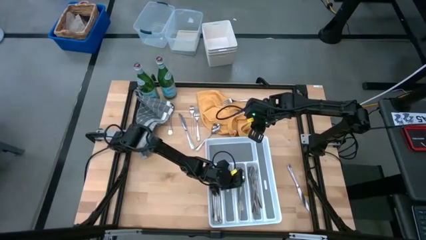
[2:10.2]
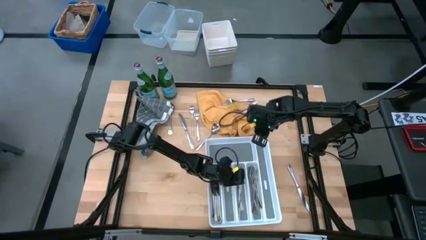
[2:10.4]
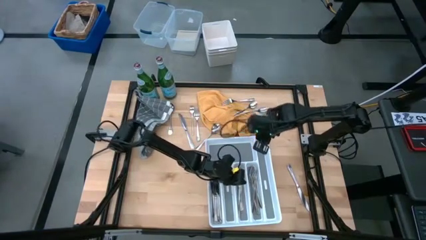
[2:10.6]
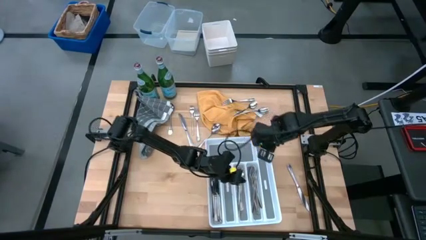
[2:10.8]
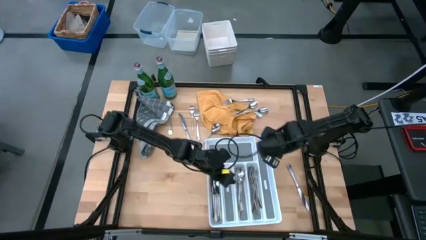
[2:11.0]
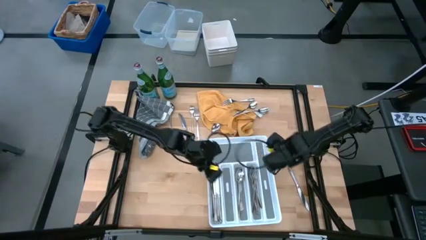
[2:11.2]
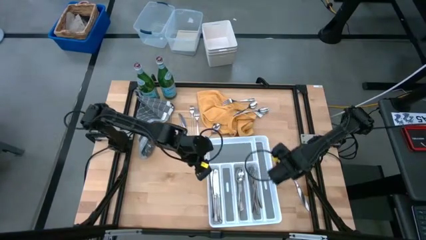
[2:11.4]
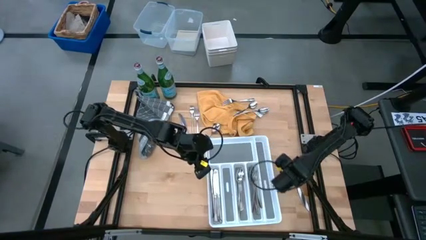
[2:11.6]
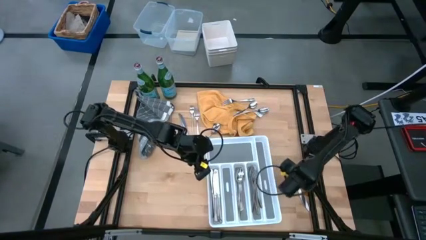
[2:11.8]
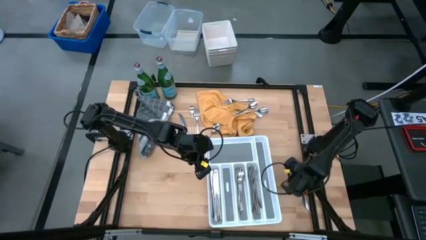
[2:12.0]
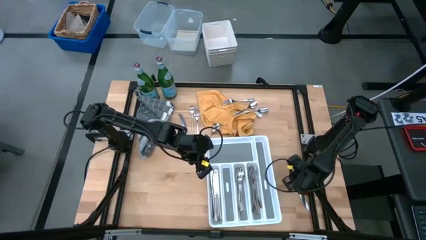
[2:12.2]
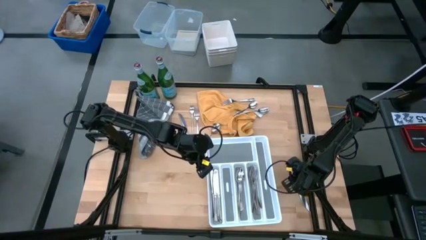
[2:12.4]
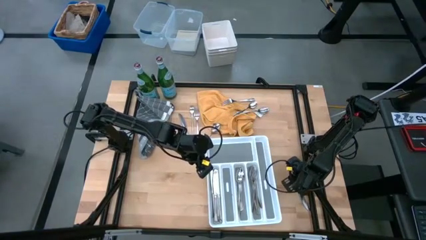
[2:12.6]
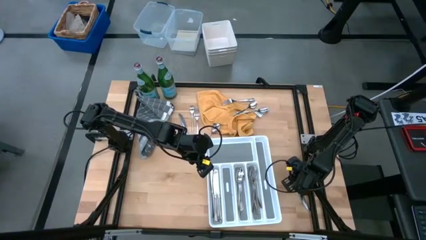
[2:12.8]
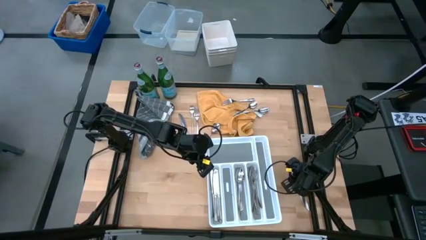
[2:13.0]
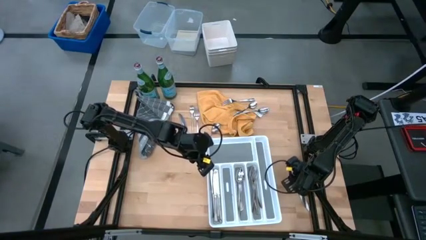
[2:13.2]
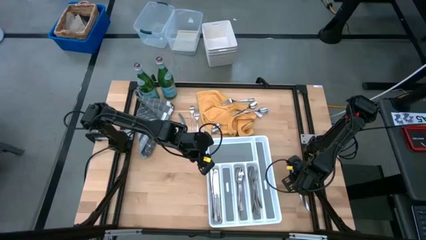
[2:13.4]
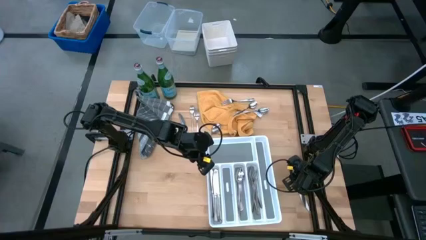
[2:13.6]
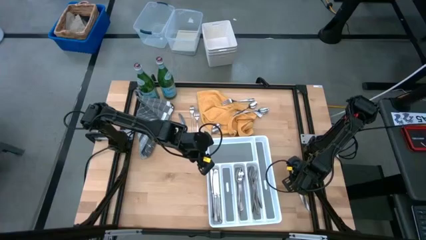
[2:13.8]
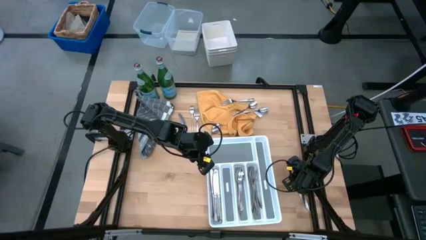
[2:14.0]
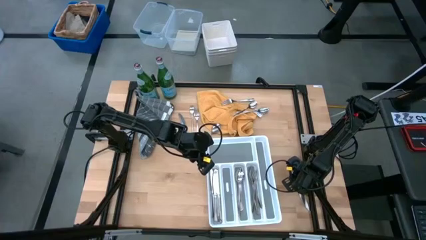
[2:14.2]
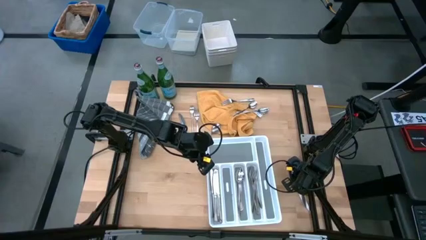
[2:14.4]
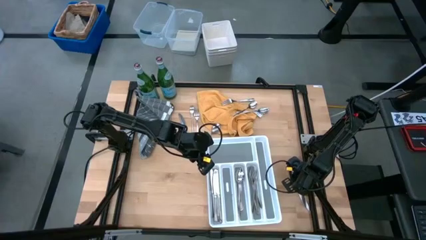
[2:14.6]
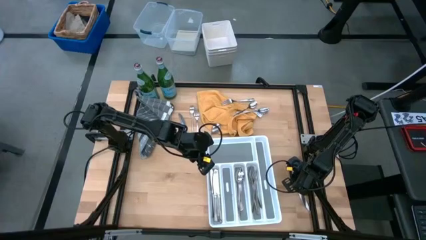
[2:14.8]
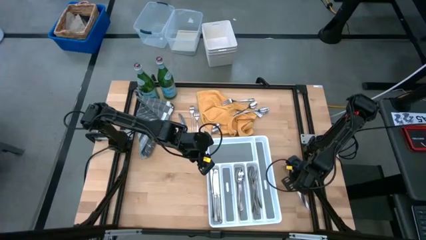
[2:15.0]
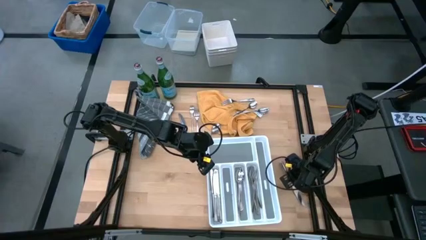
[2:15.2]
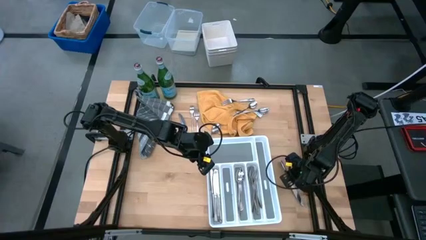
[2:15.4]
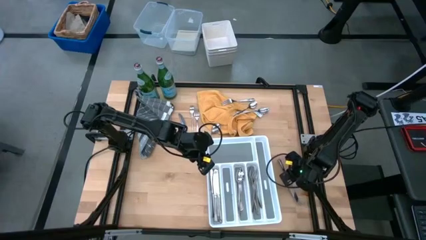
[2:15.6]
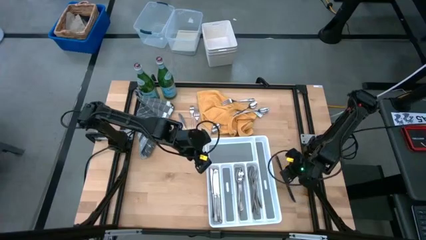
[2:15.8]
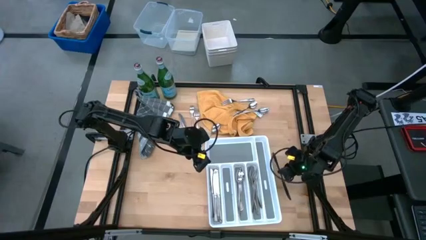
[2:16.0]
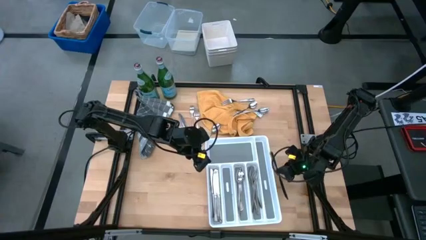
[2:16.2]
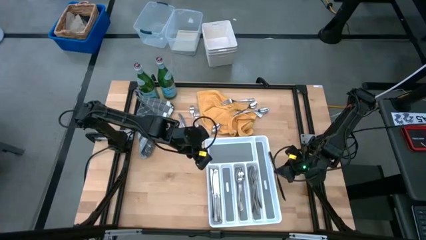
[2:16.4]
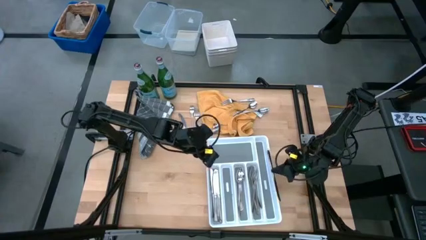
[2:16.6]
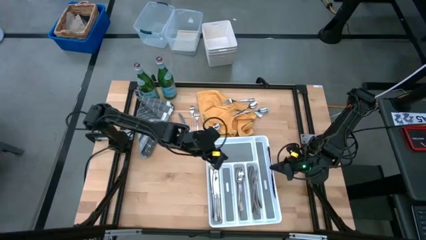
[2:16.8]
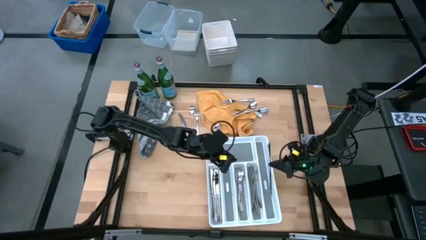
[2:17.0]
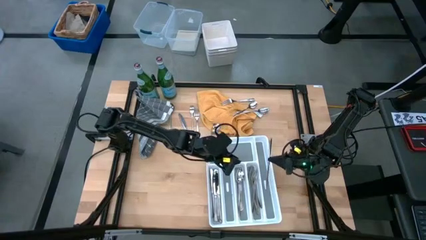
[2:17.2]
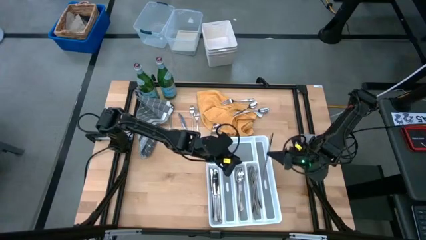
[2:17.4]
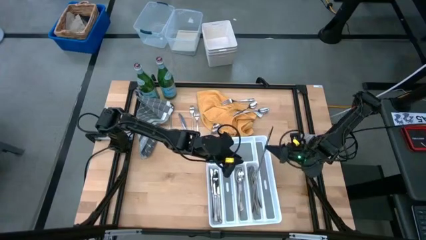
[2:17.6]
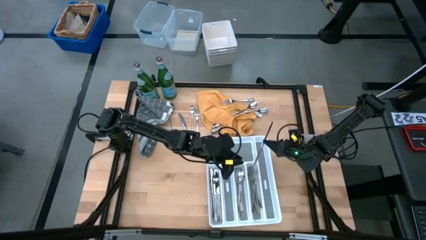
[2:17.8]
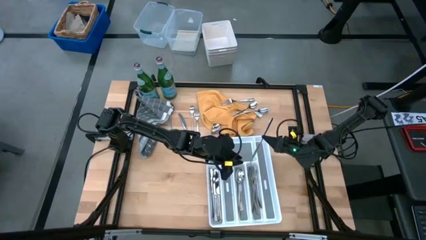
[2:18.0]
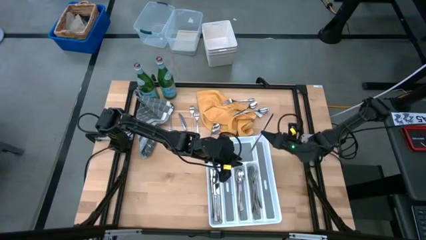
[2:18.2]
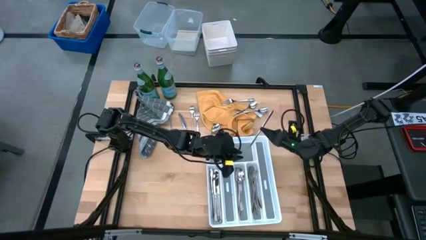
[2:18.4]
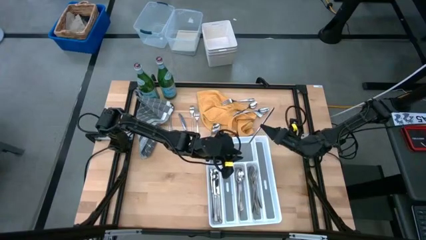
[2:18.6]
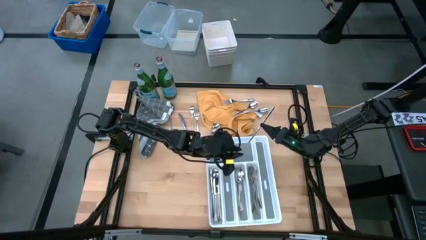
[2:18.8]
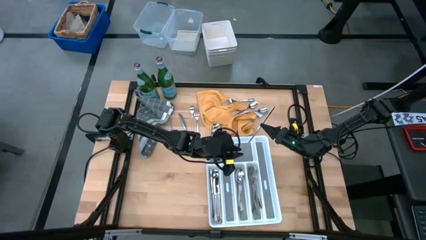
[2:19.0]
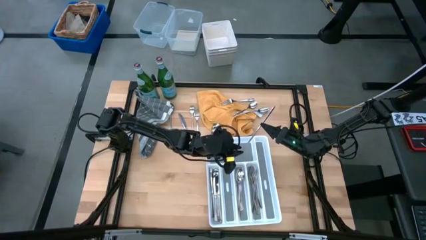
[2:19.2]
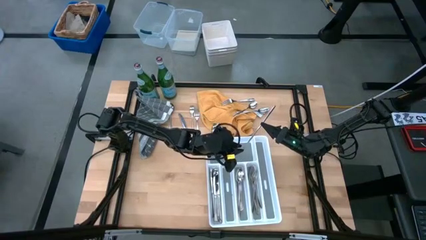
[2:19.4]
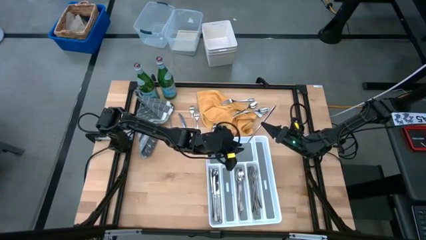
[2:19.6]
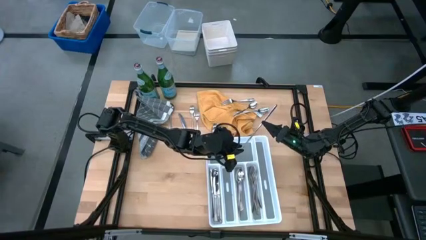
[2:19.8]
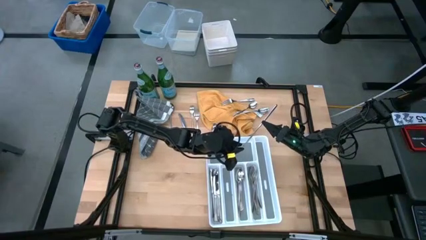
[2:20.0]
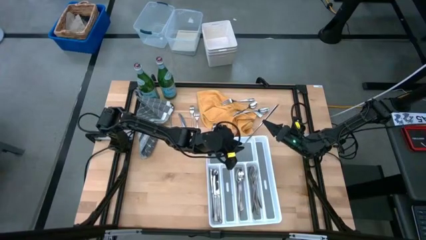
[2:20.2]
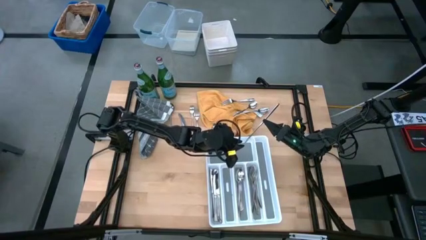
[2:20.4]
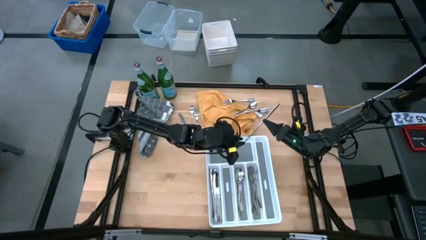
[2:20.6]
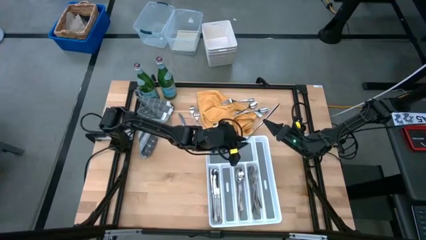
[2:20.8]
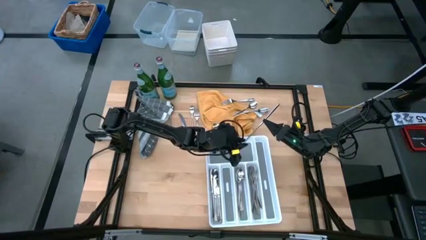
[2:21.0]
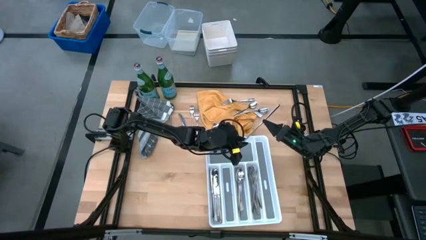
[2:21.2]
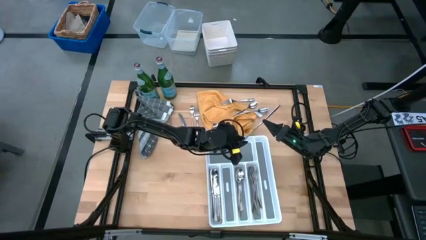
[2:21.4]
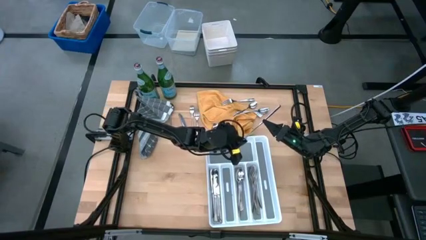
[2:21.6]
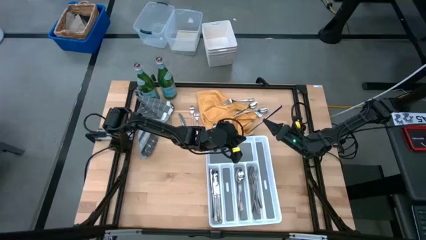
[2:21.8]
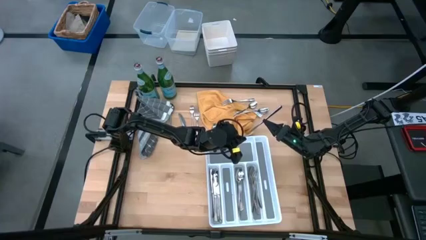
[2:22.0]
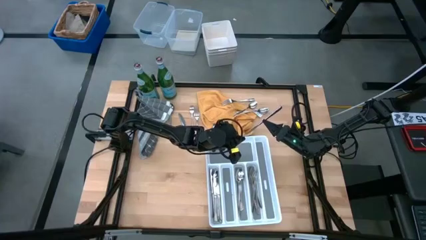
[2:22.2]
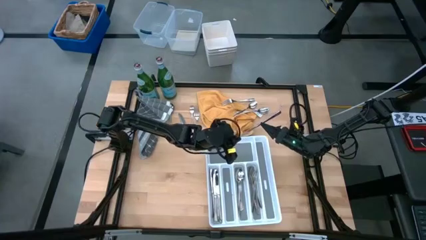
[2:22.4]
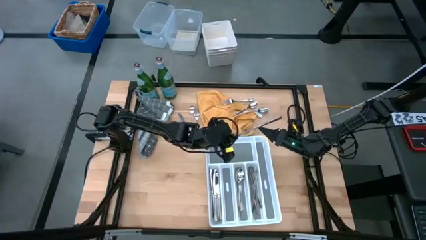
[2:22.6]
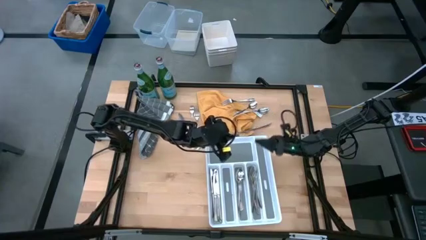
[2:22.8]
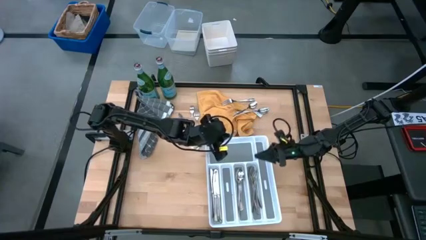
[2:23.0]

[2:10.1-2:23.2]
Task: Sort silverware
Put the table knife into the silverware tray
